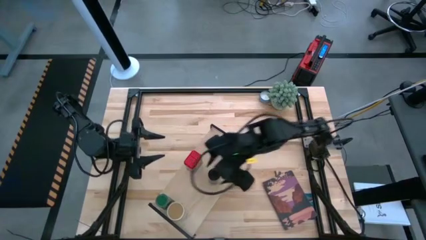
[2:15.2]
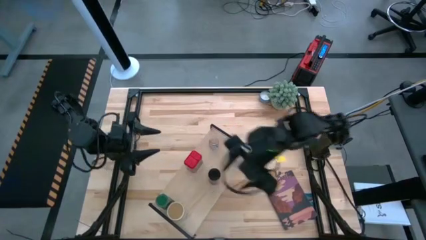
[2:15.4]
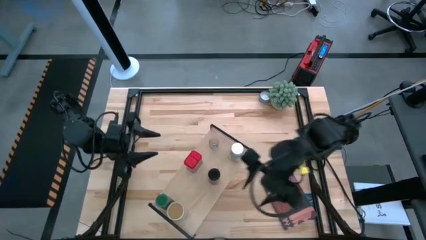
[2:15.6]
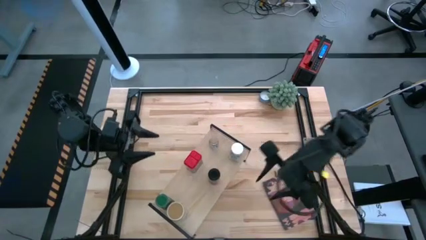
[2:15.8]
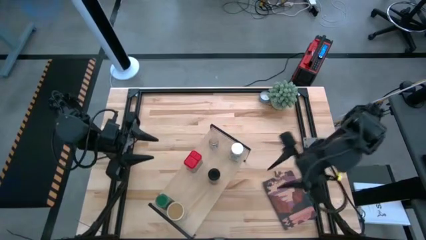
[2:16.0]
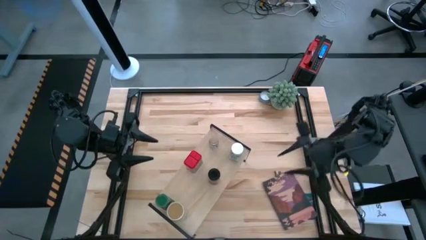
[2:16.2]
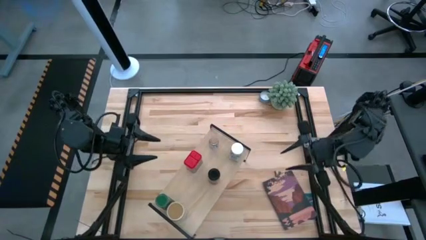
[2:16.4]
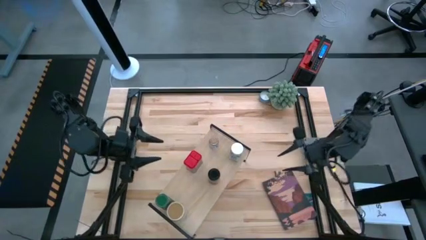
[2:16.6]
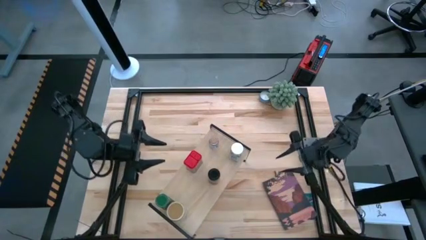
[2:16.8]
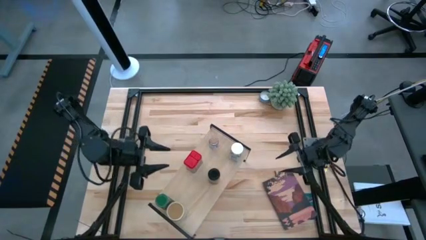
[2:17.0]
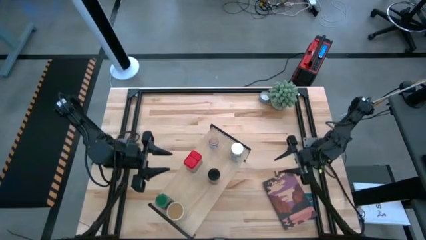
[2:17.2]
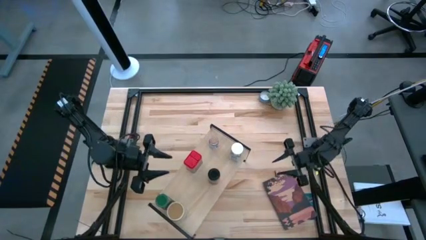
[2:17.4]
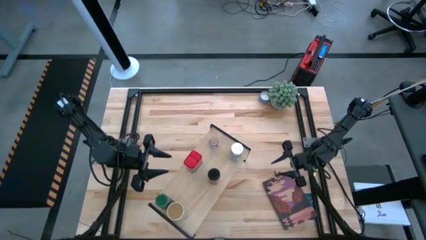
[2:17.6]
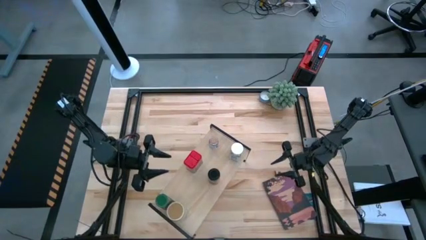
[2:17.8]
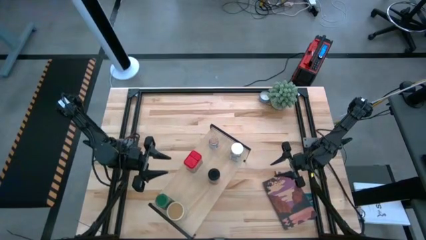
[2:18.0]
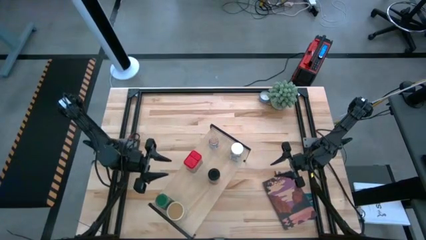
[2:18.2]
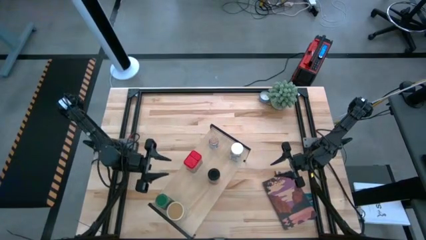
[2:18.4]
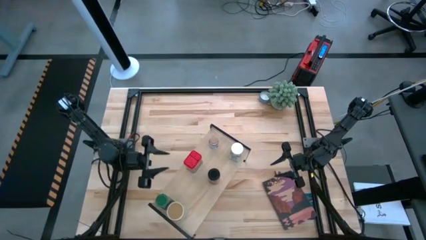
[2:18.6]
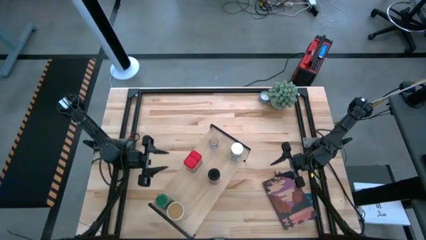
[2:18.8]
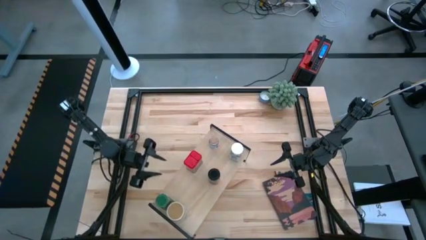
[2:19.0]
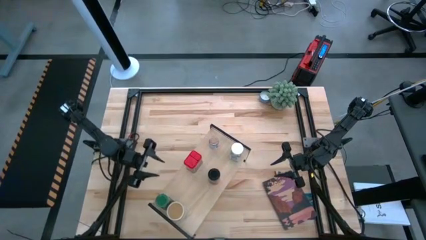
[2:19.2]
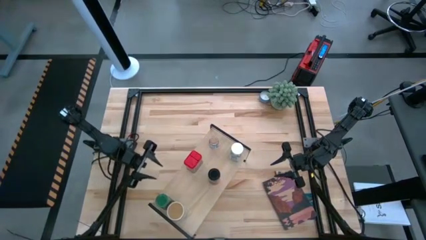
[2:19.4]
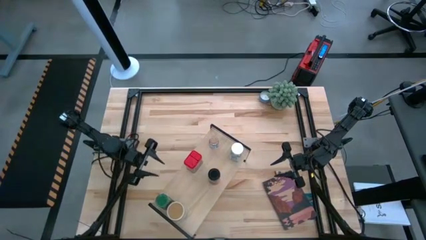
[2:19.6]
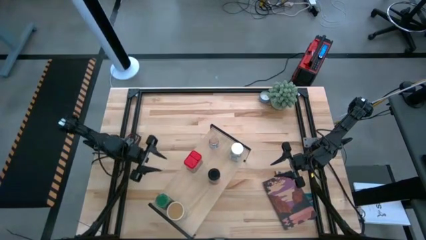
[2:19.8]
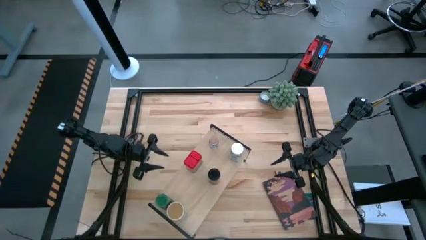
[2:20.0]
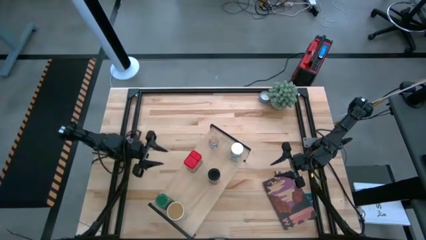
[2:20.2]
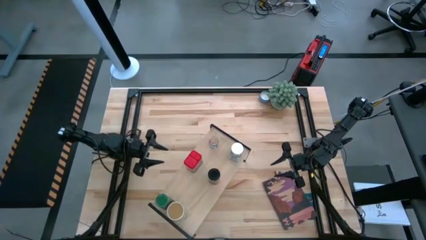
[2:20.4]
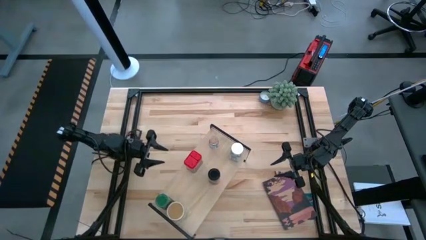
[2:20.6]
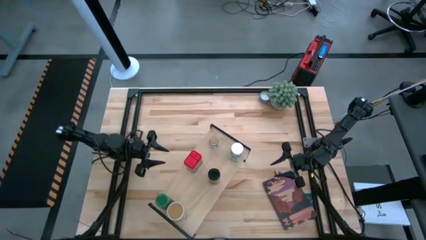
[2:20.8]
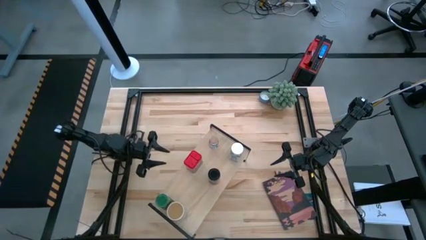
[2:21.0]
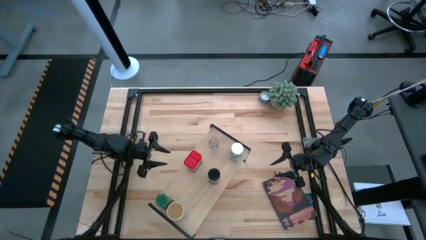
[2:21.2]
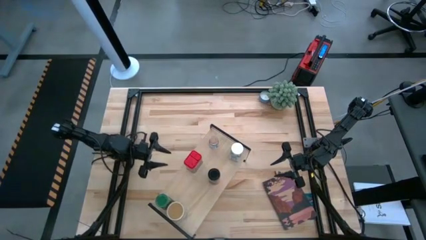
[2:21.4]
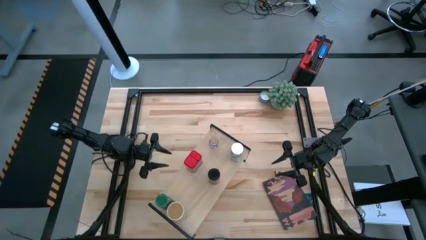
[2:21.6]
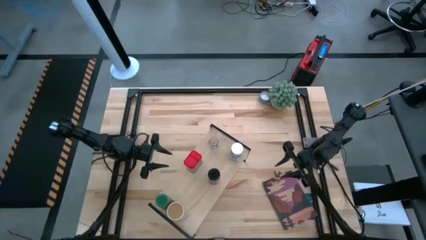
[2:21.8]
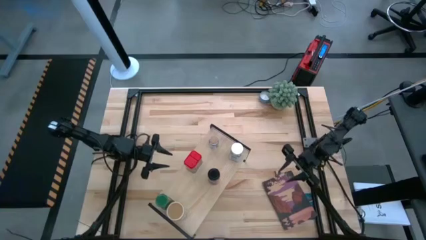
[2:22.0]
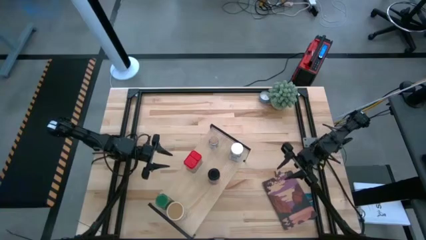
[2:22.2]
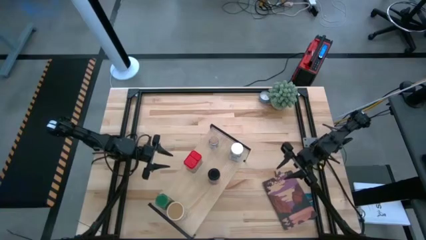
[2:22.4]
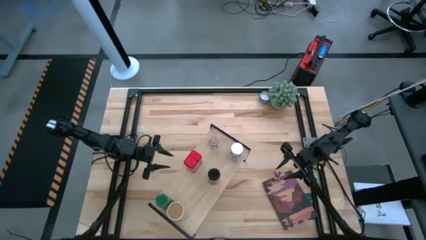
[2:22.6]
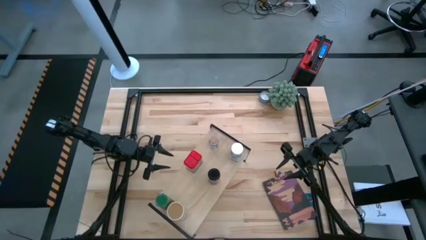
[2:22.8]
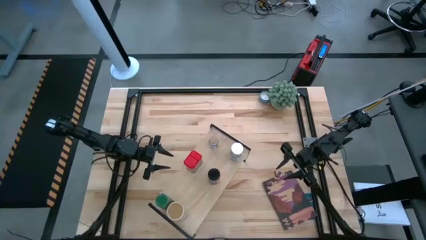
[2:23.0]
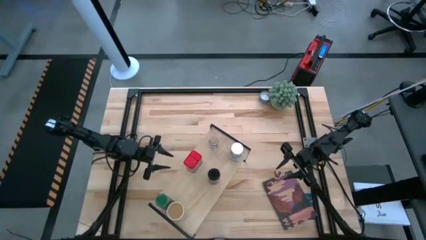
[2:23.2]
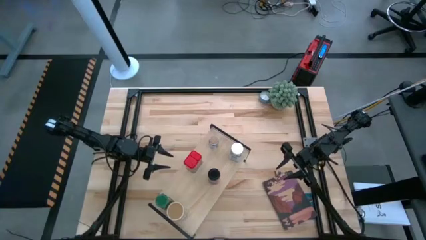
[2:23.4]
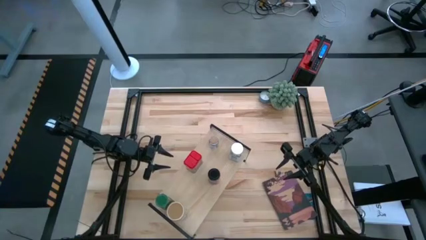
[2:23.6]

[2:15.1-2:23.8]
Task: Shelf spices
Return to Home Position

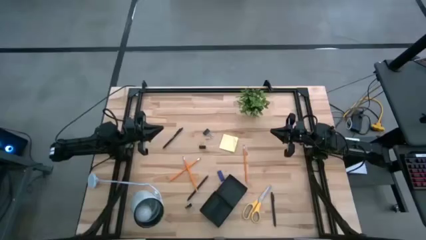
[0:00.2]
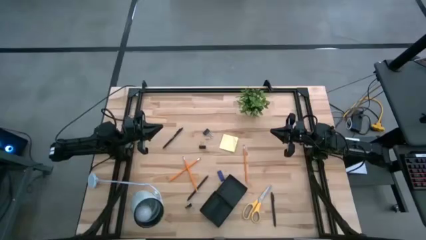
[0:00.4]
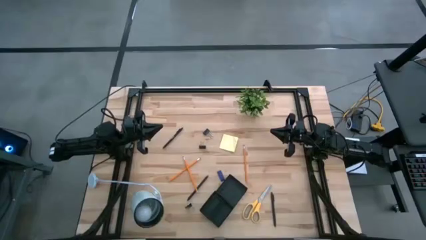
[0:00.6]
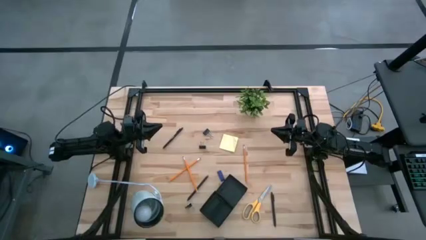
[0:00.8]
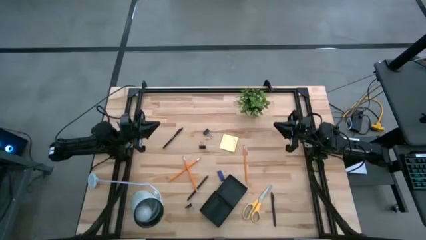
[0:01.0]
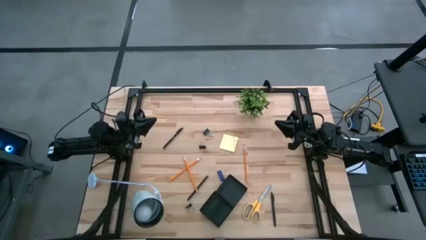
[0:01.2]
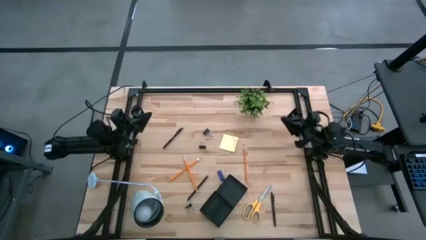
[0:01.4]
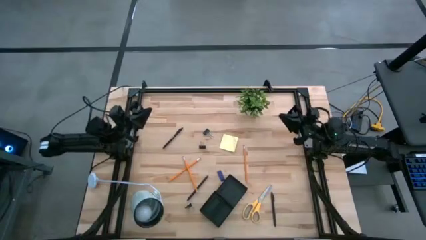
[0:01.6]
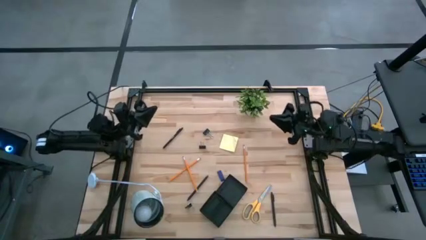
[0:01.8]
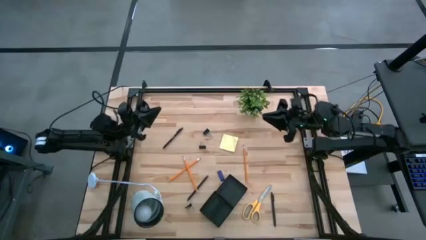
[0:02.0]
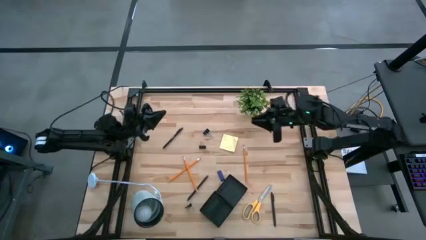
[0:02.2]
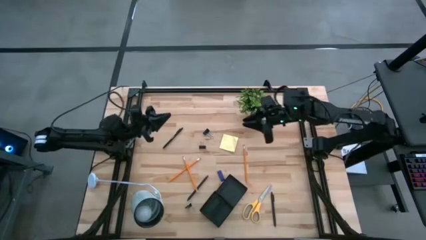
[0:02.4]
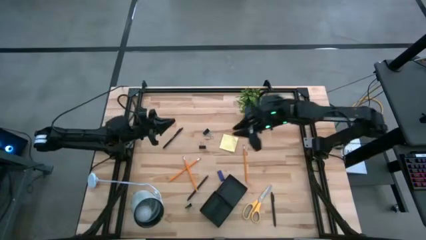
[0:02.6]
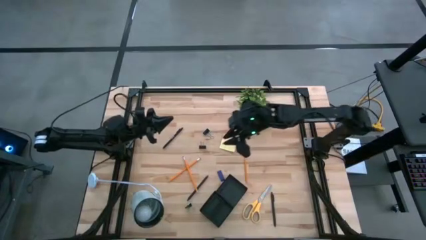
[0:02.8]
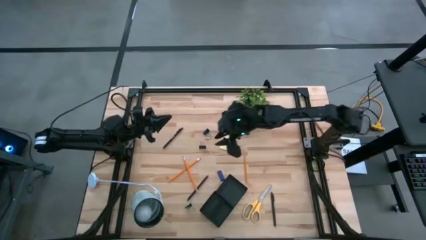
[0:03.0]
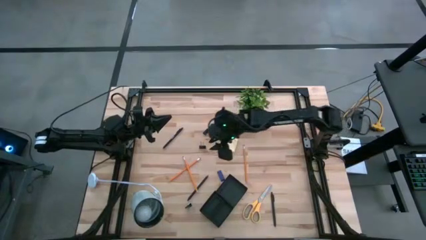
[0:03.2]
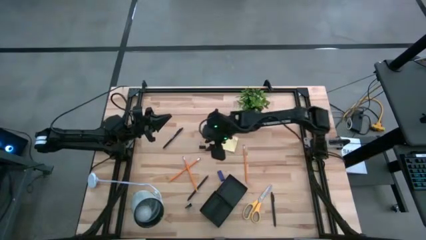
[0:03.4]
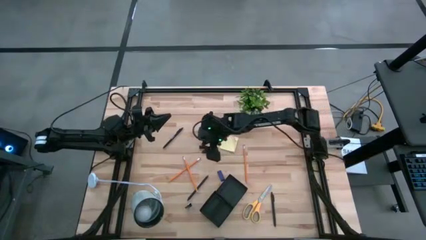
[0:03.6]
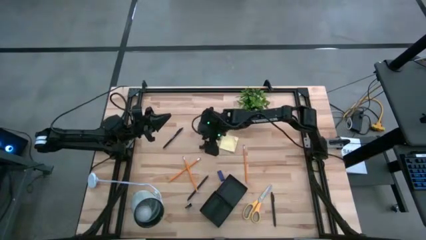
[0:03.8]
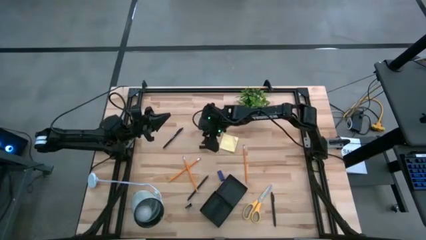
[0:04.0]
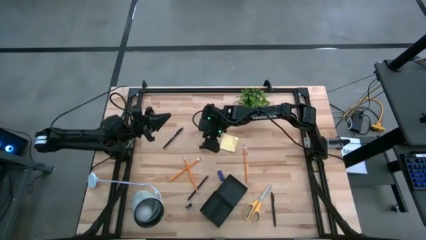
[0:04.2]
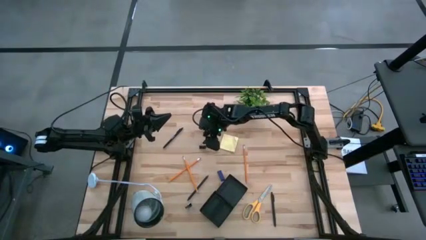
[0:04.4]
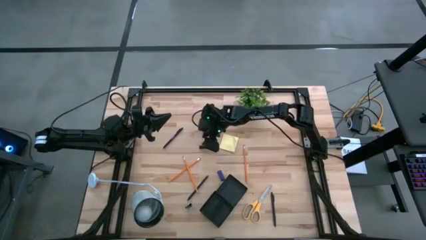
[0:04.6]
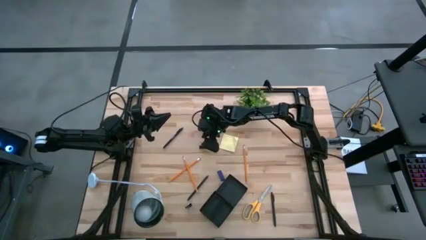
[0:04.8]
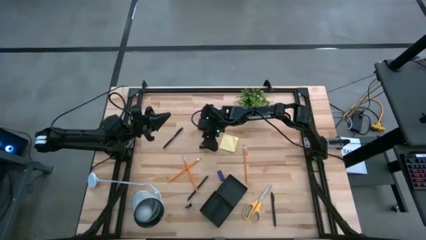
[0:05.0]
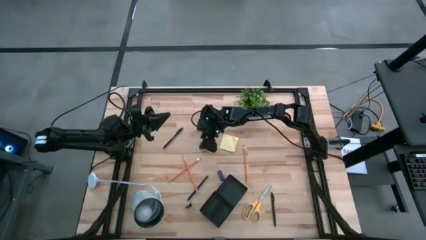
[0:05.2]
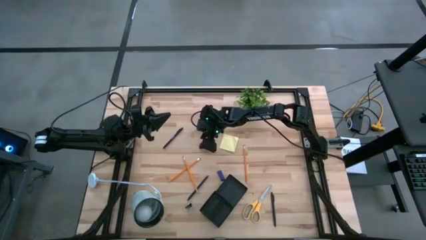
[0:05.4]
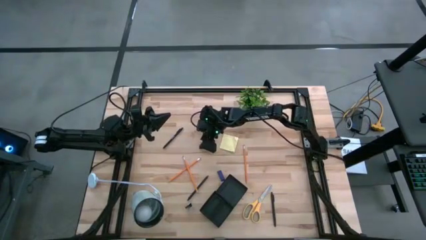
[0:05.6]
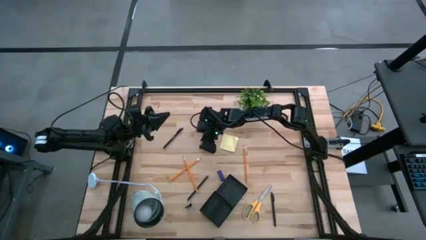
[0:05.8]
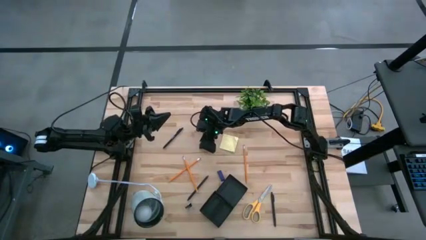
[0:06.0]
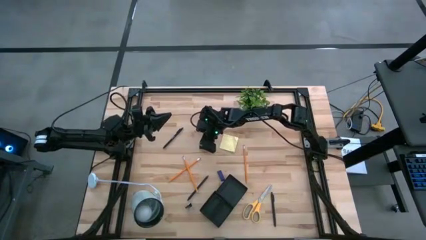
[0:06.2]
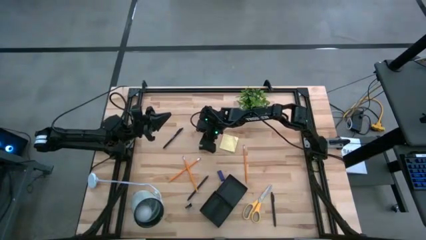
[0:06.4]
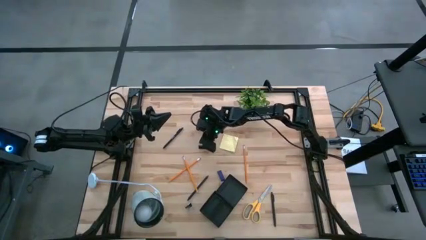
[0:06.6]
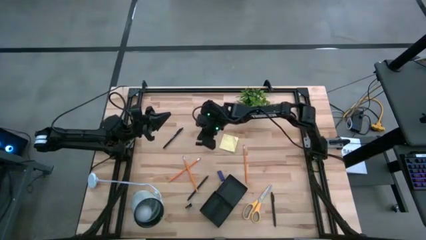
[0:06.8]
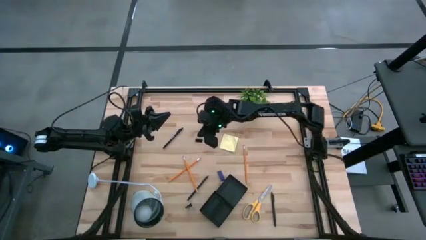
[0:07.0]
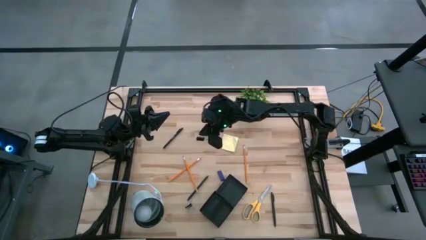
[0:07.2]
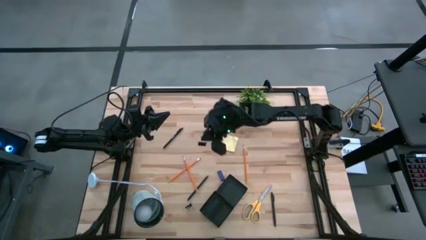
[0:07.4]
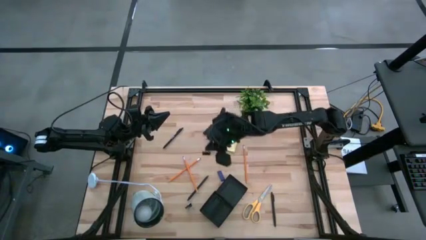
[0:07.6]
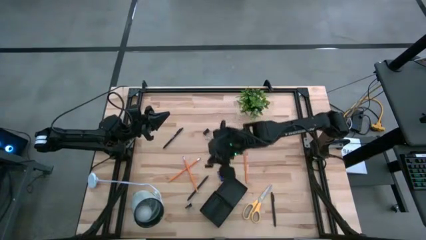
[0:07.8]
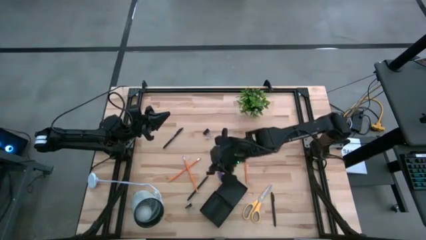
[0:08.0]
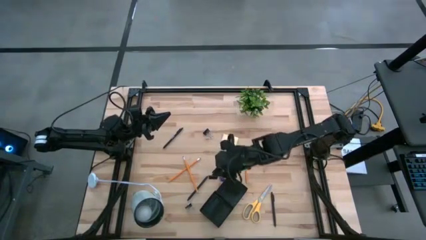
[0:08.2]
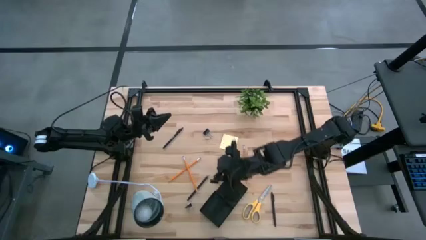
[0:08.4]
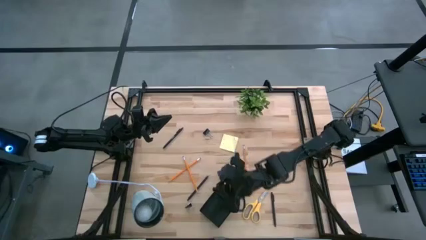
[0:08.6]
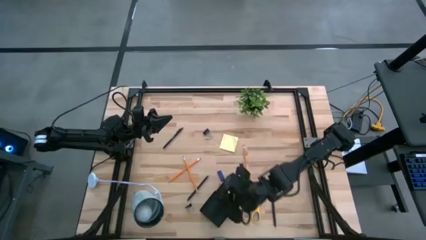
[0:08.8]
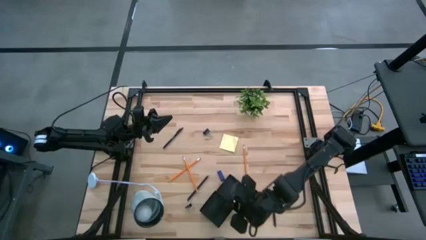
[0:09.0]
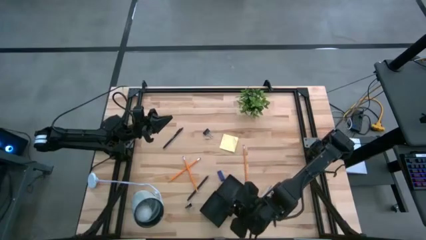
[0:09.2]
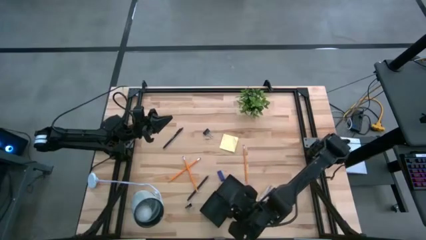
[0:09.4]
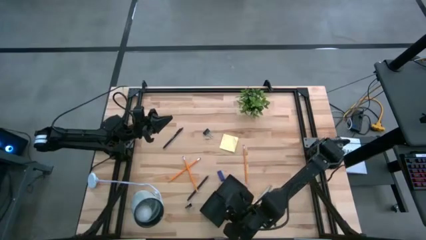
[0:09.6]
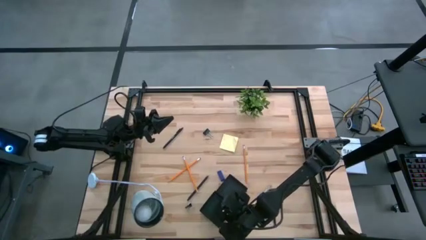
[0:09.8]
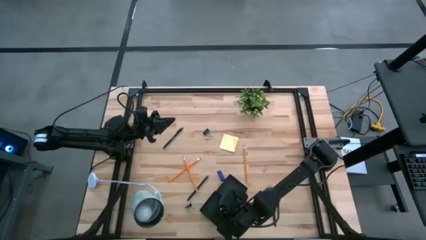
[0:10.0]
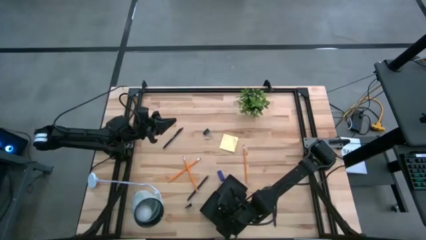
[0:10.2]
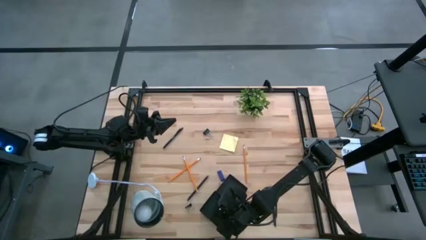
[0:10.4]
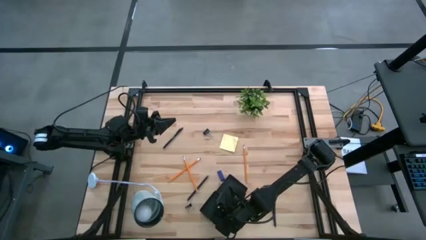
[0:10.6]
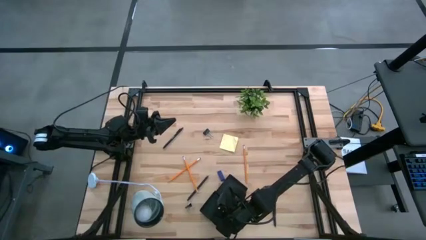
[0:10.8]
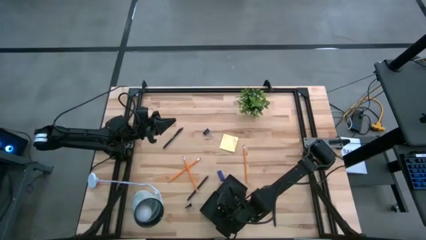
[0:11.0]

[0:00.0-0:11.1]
Task: Pick and place office supplies into organizer
Put the middle binder clip into the desk organizer
